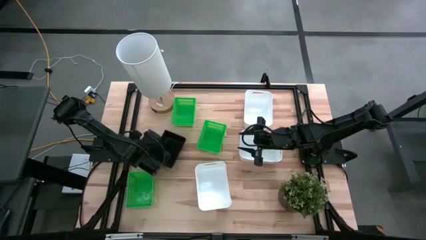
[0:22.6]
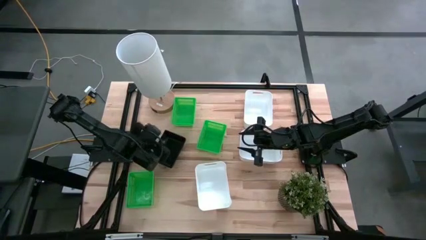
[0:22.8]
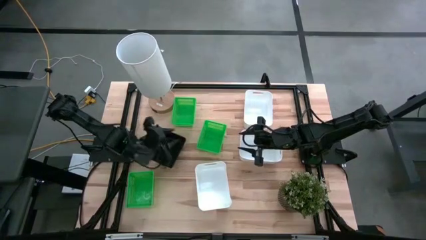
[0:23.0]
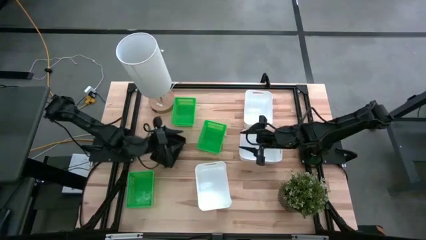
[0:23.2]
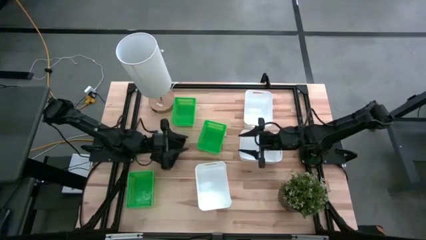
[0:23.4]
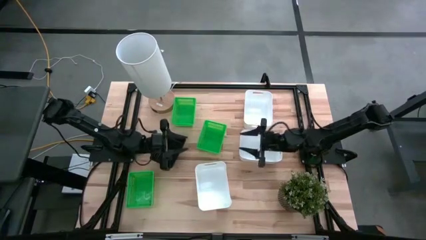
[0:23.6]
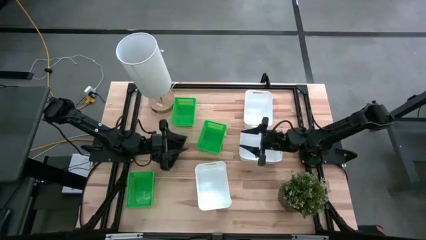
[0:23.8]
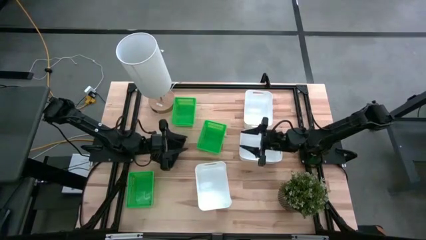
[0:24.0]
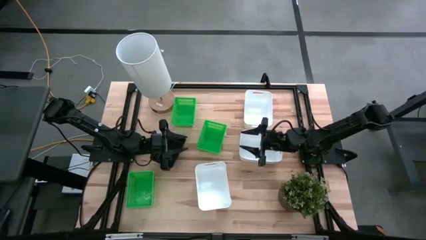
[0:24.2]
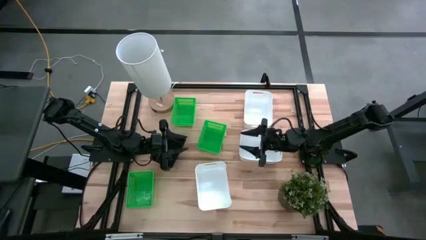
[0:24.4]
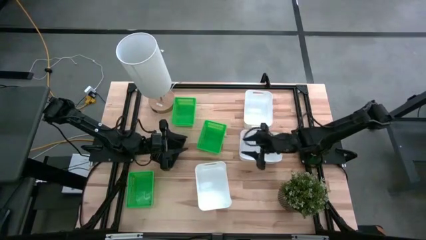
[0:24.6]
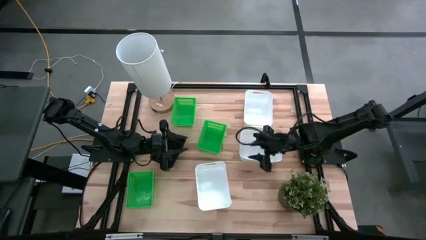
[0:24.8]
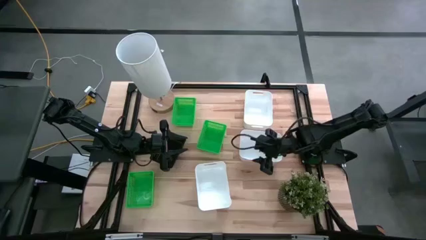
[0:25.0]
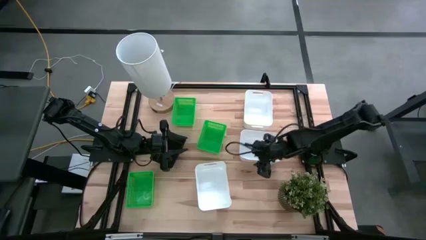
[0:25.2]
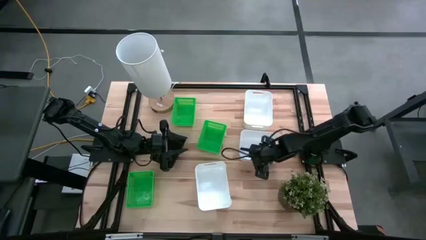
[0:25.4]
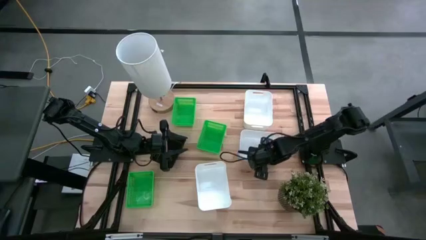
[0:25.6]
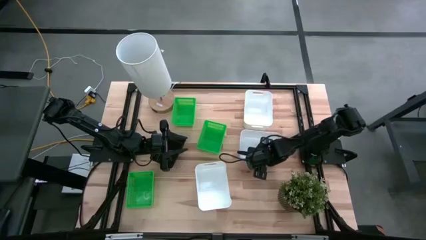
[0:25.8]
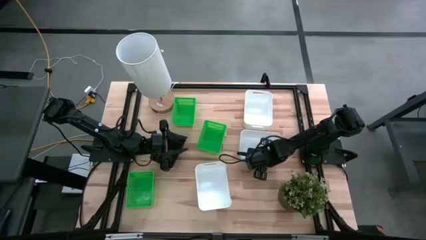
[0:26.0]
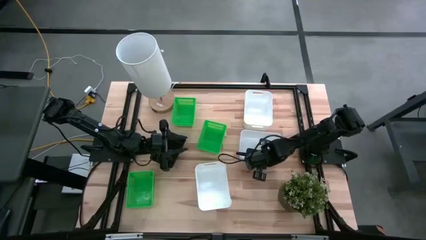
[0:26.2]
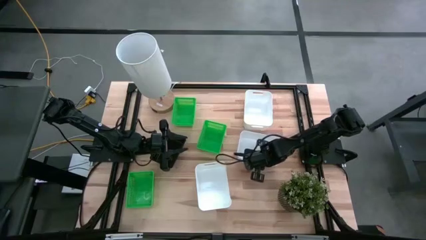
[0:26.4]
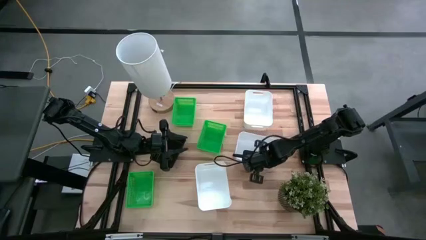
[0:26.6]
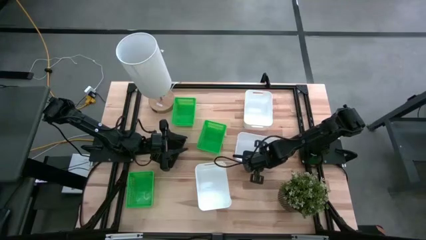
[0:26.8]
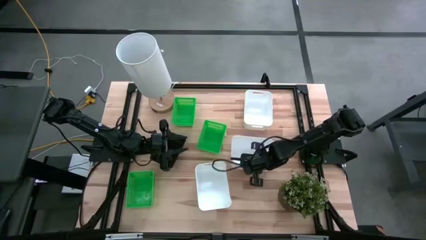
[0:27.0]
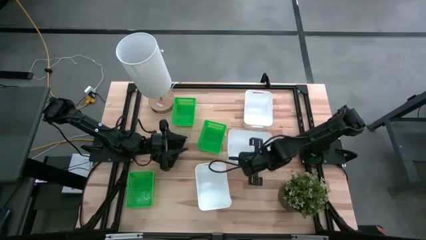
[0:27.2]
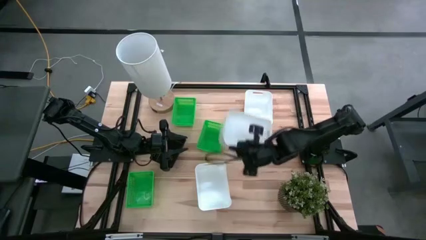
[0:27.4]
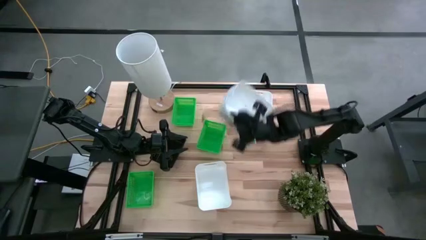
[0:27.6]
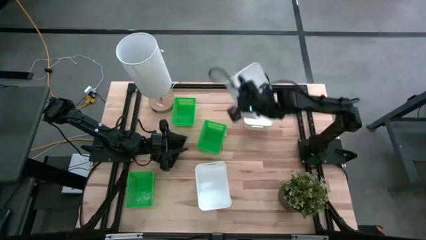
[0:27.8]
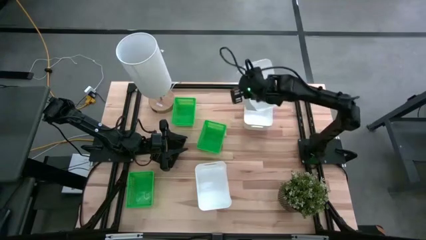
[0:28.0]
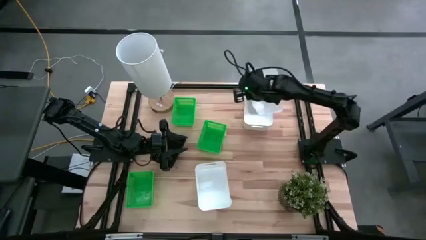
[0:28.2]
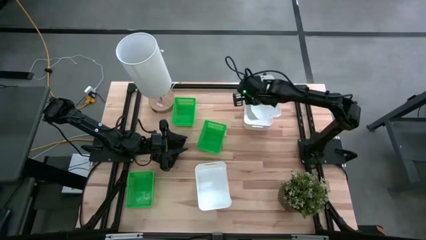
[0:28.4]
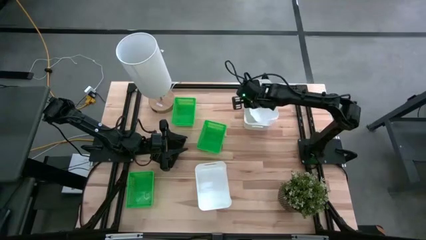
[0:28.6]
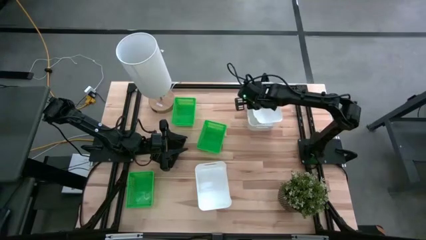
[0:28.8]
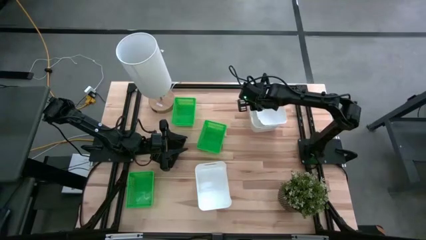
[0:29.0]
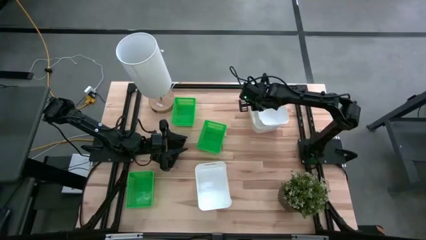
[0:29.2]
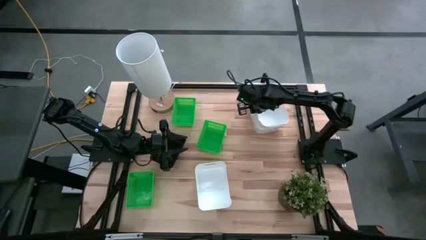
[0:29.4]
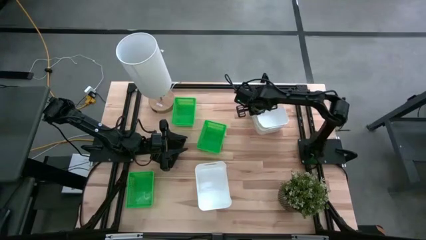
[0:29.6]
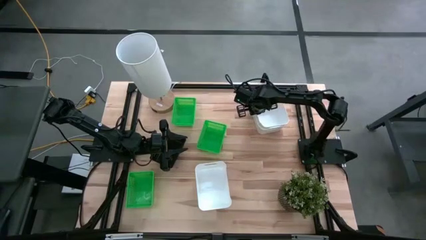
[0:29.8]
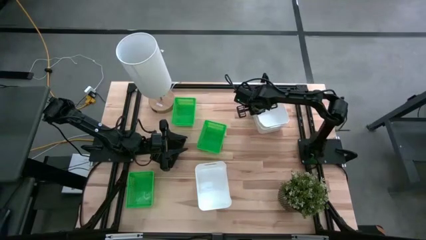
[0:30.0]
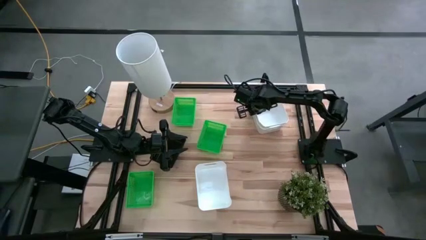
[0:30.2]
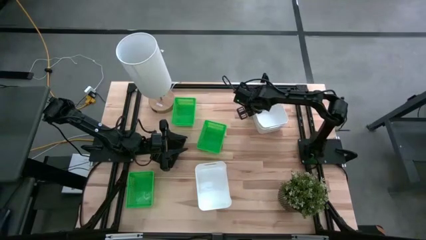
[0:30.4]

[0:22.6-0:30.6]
Stack the middle white bin on the top white bin

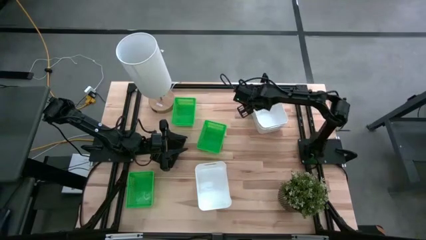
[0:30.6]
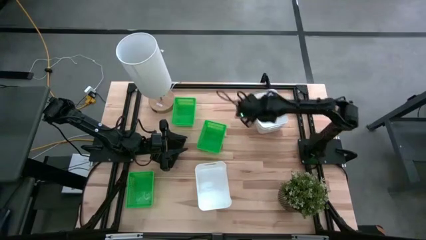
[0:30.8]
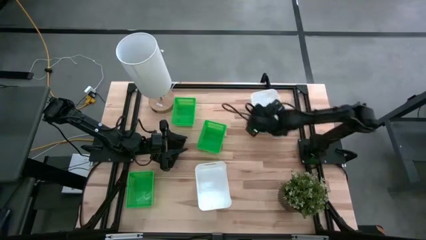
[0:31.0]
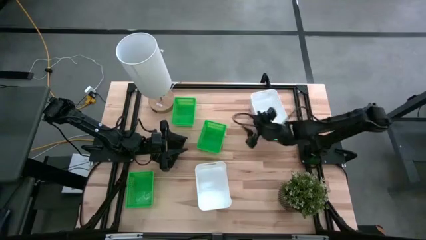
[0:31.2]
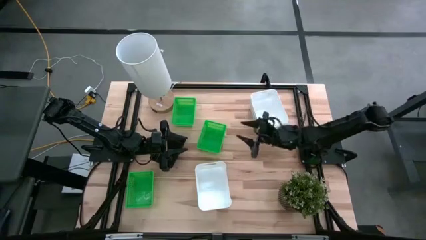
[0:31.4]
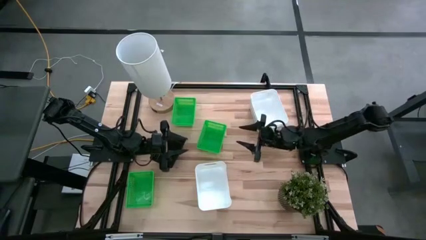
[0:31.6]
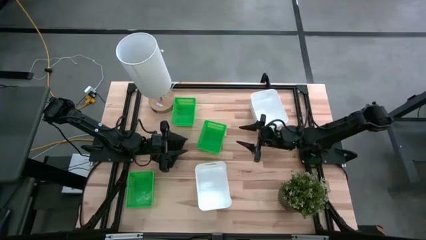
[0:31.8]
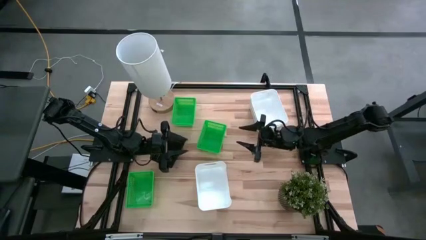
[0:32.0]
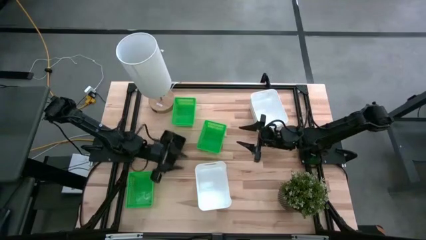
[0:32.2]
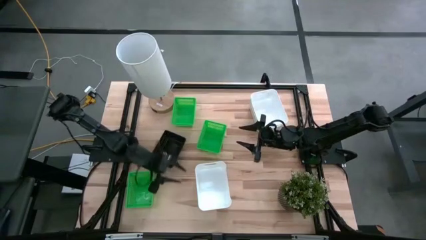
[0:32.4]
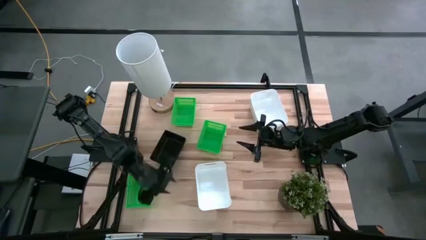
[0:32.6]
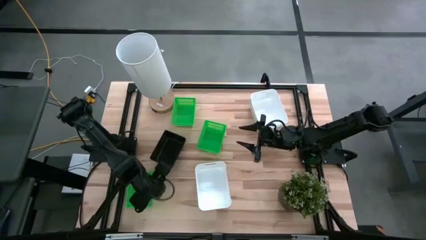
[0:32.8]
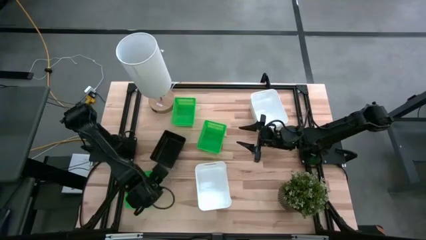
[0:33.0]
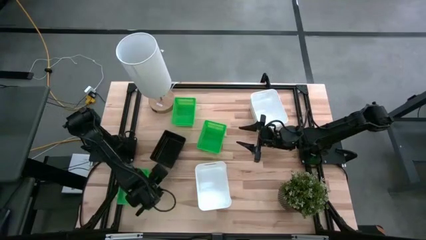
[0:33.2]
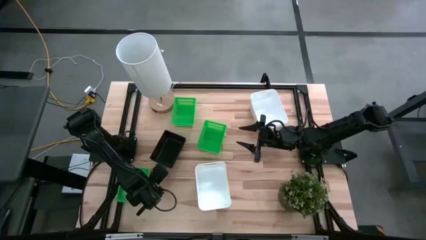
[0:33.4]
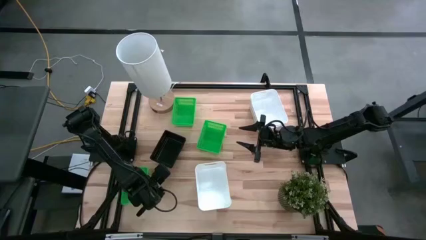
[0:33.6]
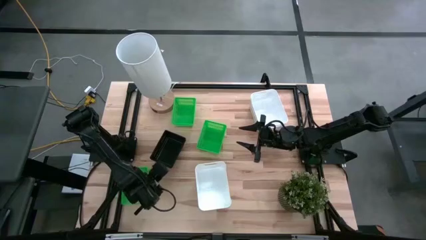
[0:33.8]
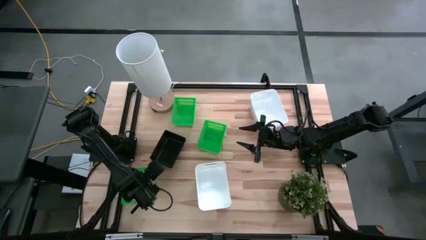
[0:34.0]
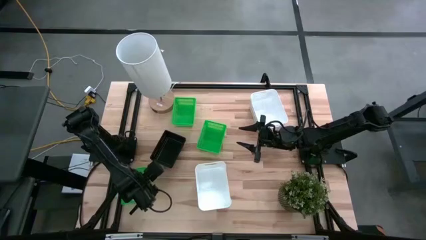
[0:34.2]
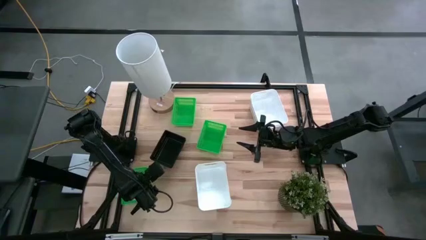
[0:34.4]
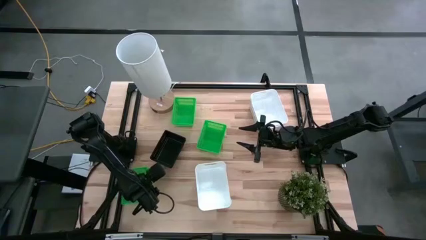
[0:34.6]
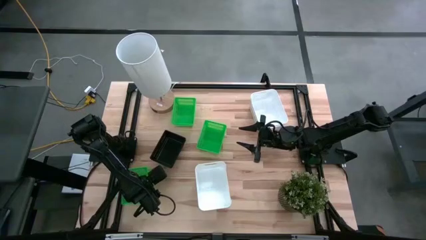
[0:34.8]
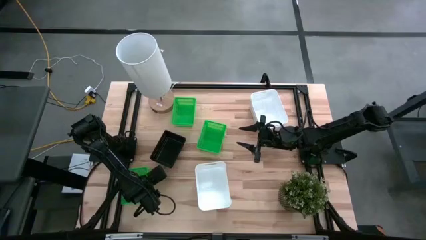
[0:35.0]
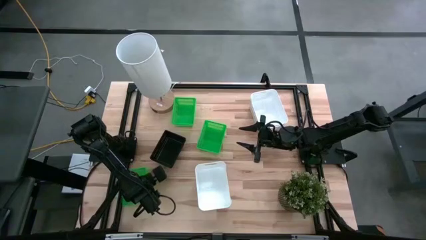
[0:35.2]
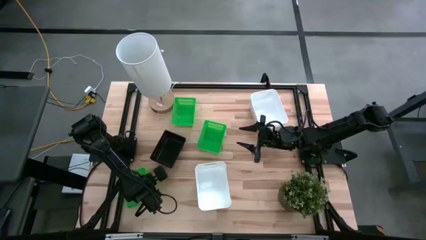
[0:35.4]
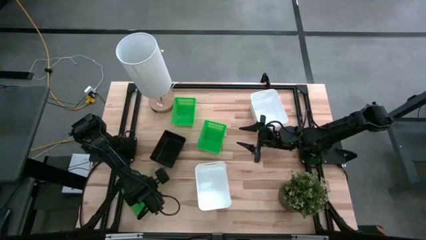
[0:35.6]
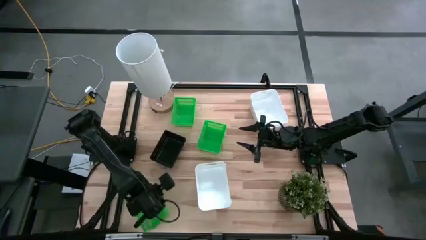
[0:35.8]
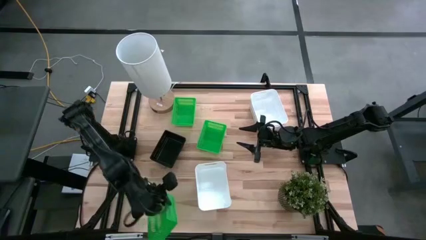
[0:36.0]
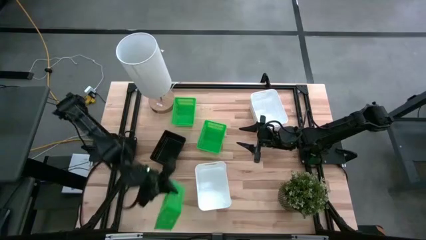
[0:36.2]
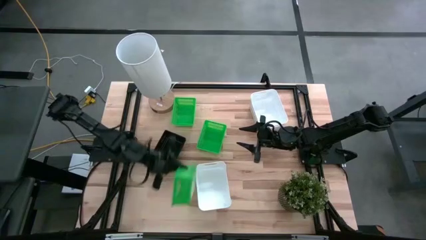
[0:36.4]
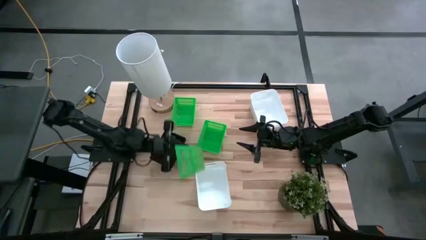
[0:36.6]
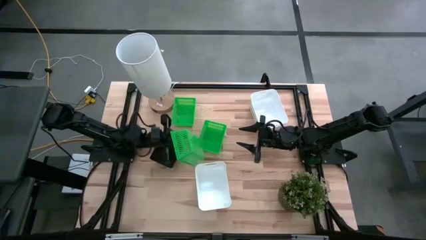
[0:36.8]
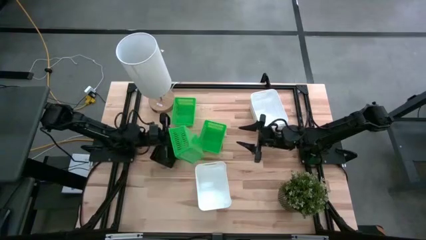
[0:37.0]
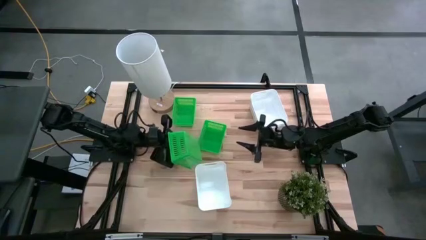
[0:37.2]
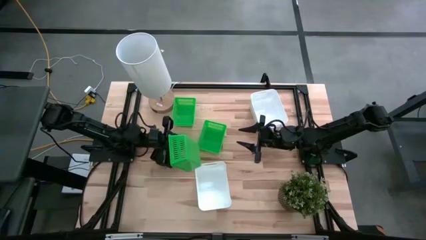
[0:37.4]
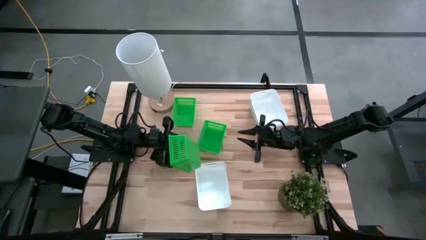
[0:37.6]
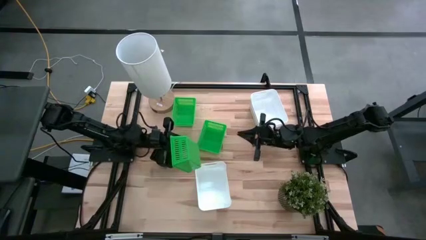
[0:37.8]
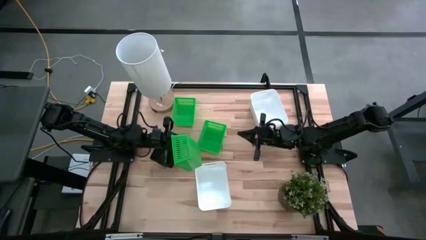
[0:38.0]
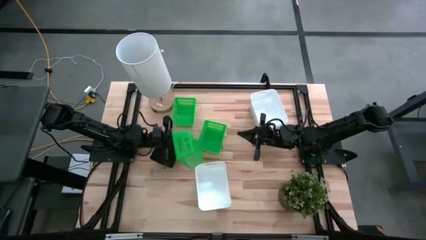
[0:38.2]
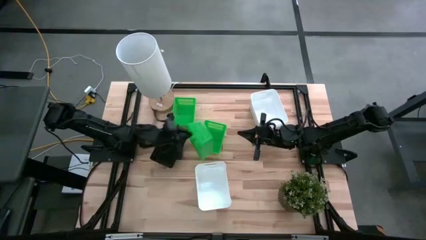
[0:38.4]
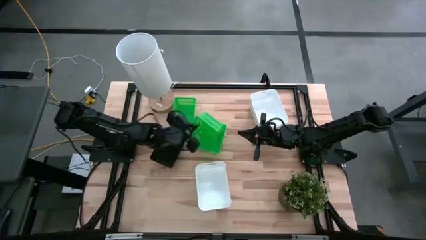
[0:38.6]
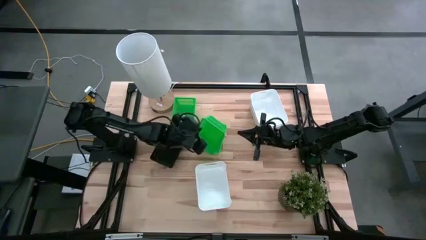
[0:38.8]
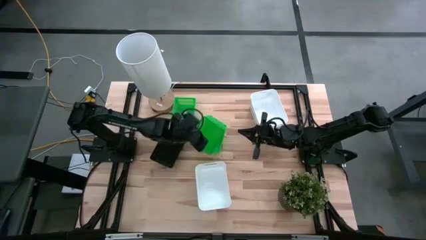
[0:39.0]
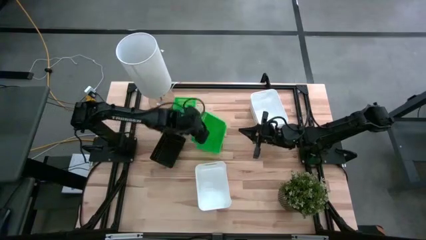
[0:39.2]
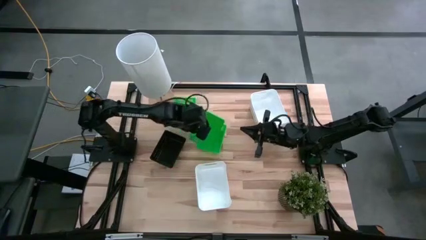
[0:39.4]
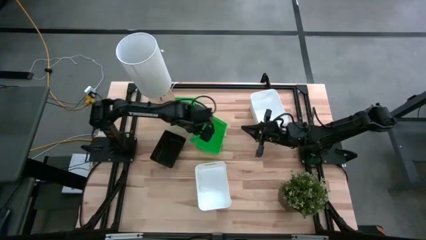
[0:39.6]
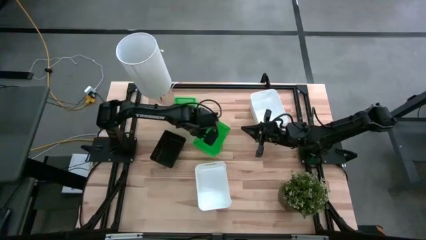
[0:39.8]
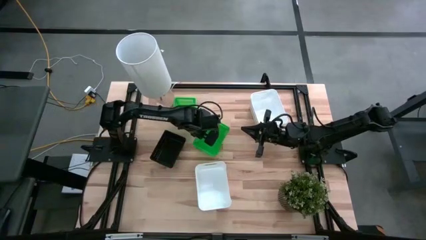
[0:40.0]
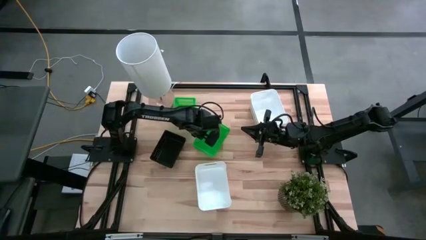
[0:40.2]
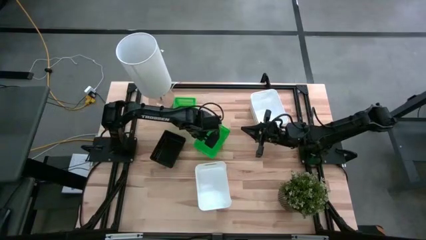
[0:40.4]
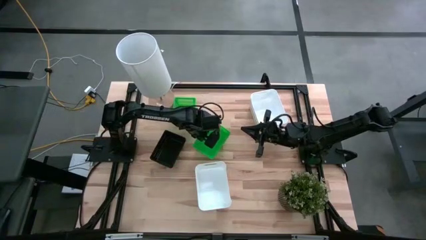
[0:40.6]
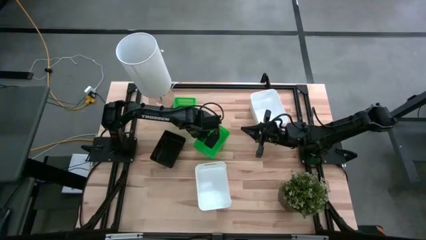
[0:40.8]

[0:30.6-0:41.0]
Put the bottom green bin on the middle green bin
